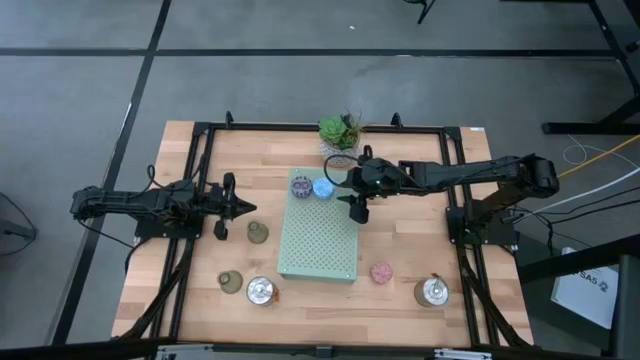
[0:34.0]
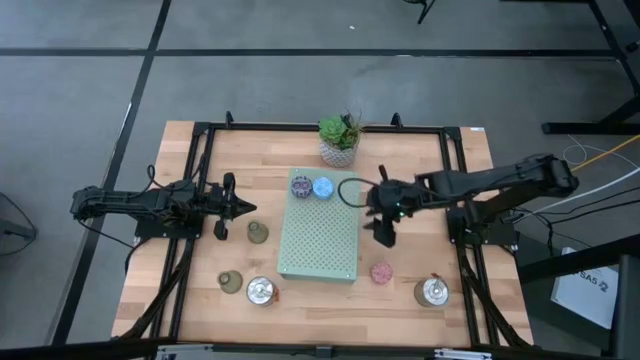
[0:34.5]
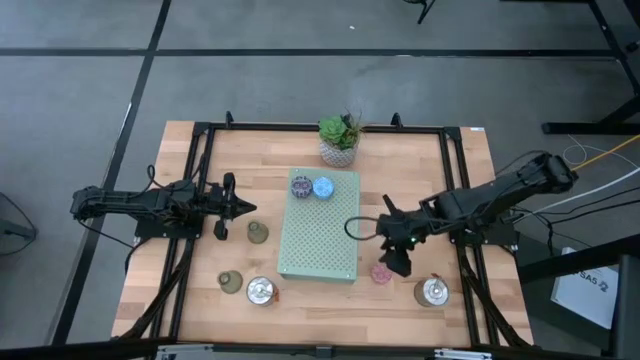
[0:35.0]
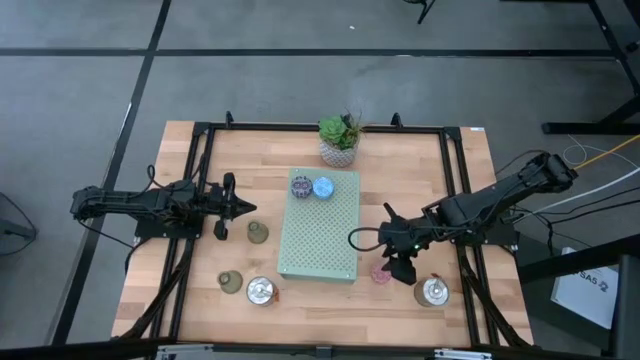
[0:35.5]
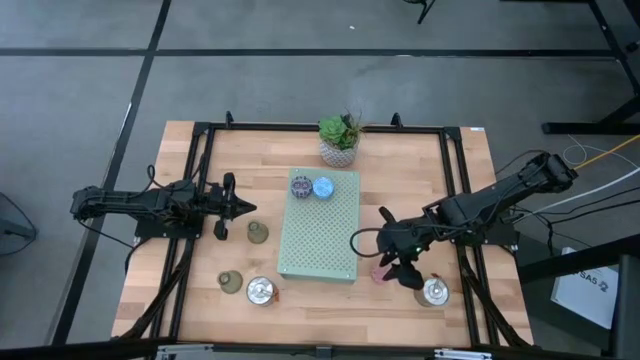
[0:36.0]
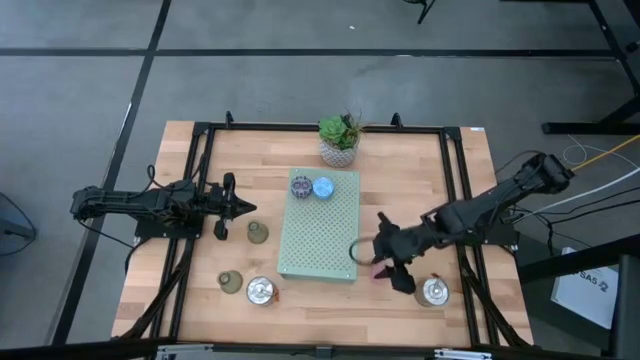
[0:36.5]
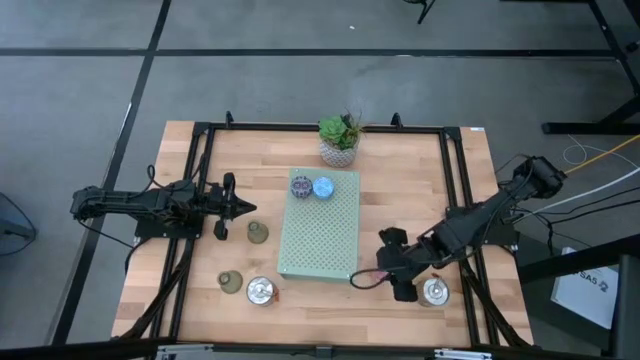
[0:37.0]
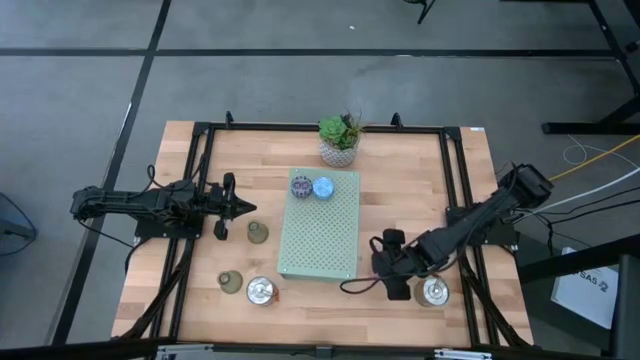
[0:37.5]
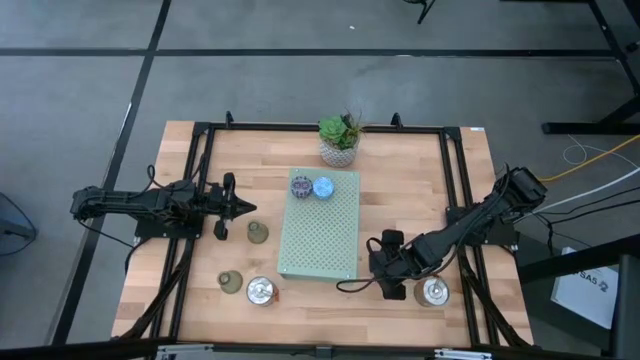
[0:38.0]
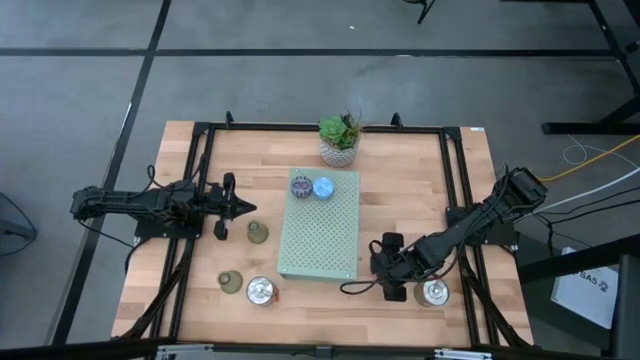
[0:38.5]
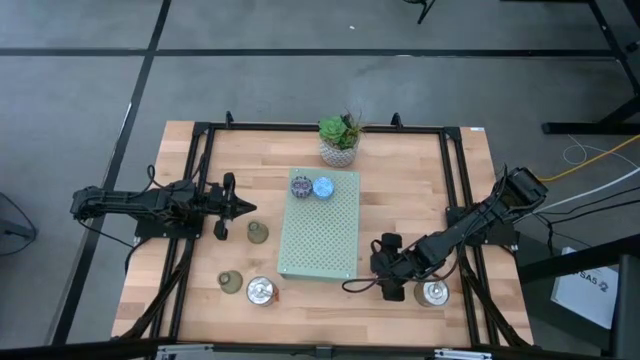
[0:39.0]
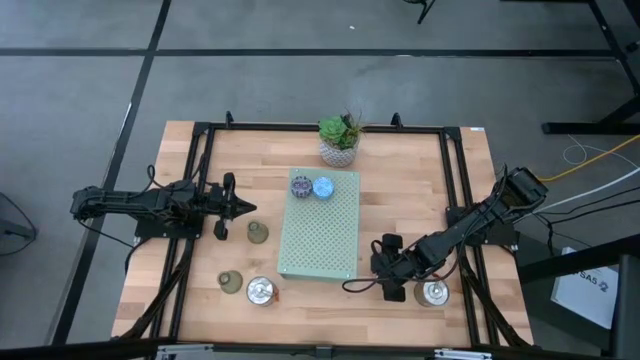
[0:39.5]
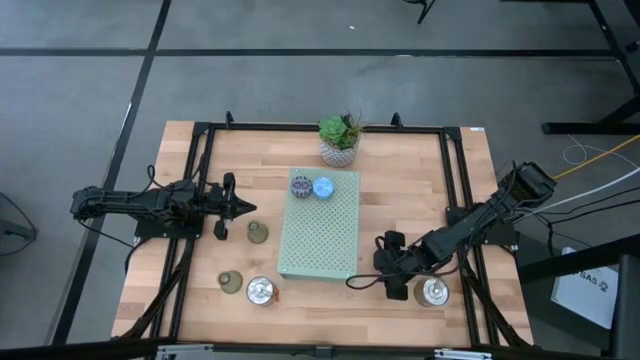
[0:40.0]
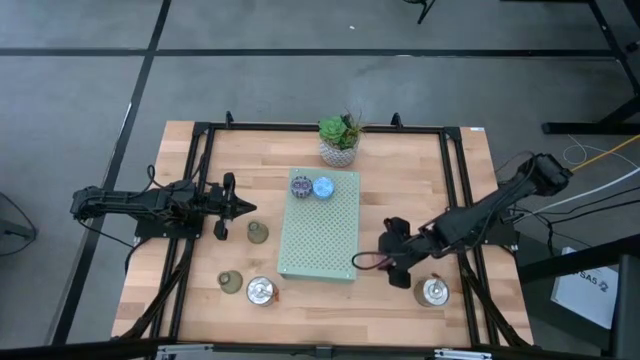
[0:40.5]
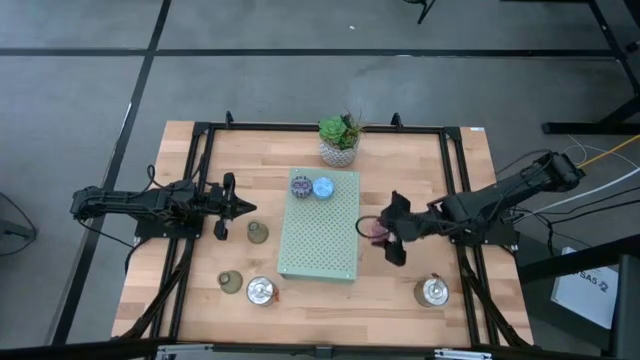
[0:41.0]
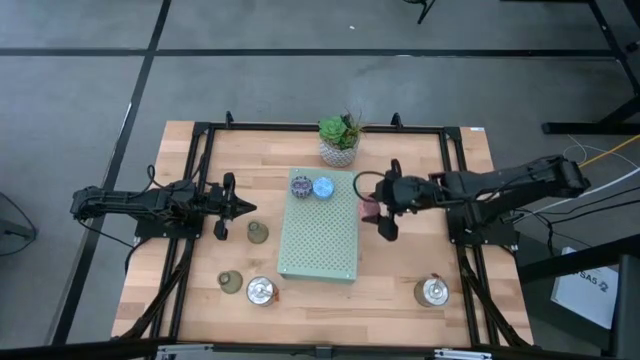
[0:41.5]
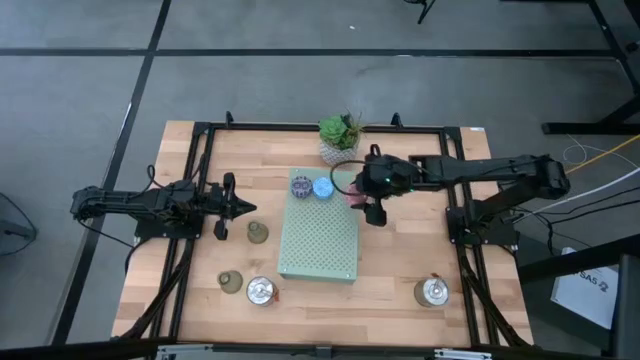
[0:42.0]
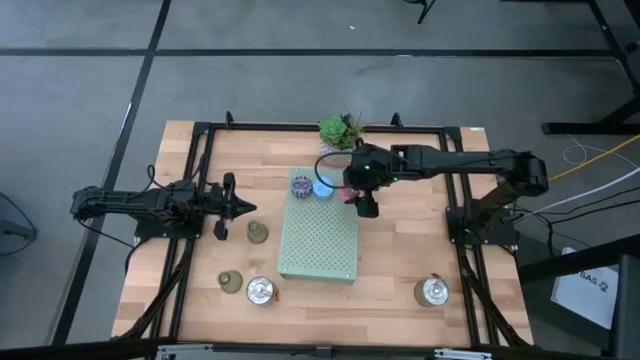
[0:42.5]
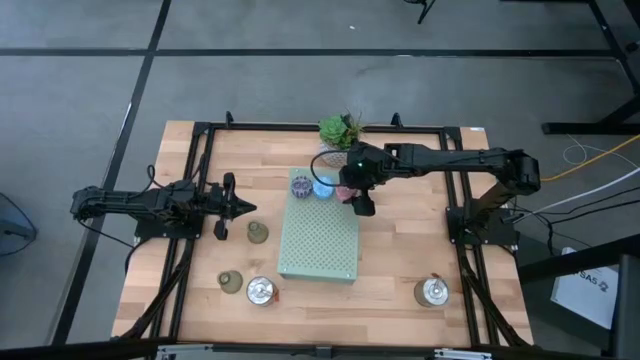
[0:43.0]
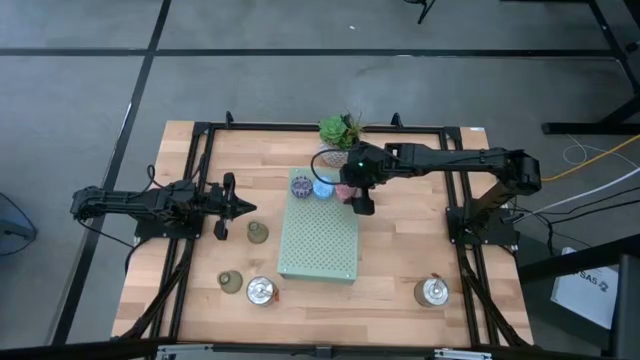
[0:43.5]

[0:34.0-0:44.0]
Task: Pick & Place candle stick holders
Put the pink patterned scented candle on the shelf

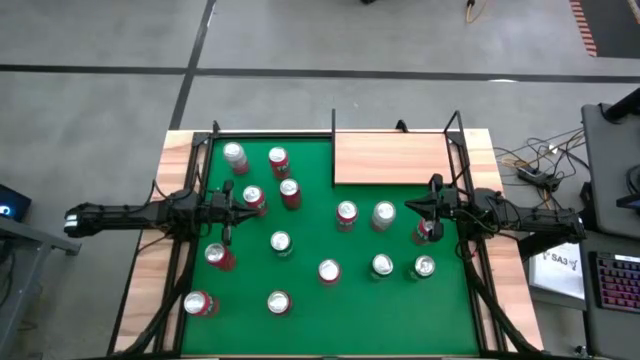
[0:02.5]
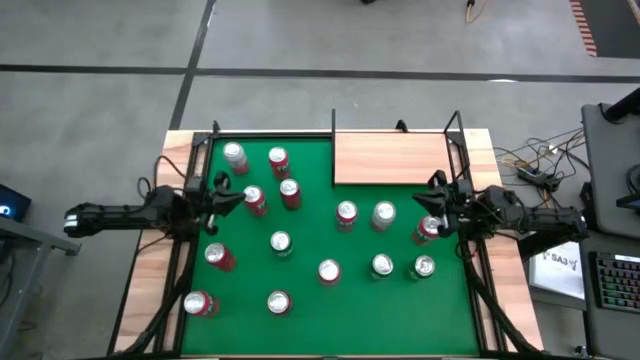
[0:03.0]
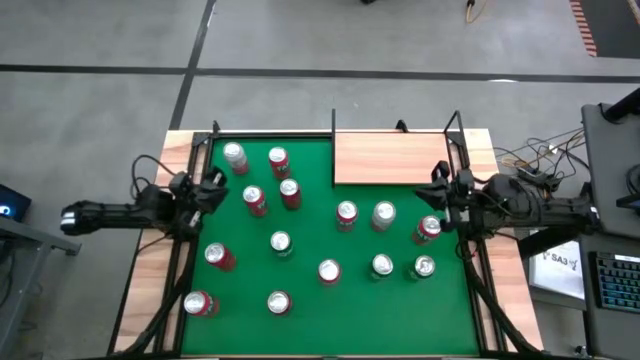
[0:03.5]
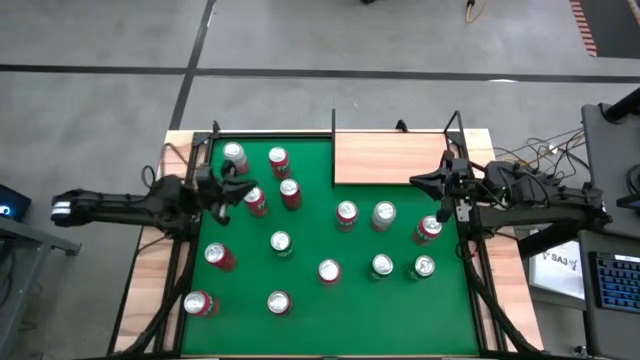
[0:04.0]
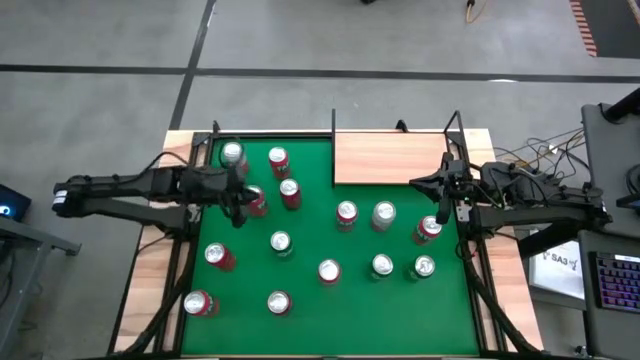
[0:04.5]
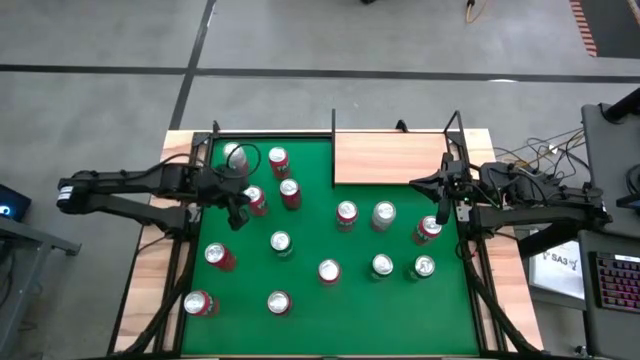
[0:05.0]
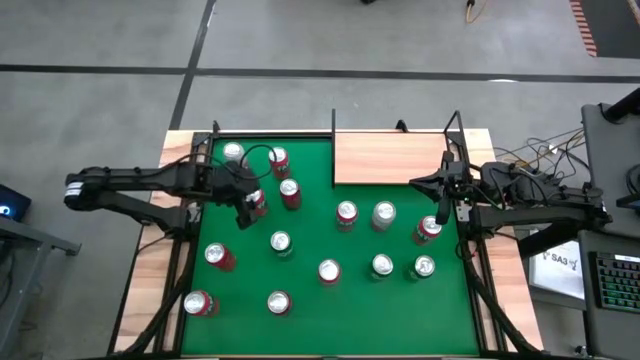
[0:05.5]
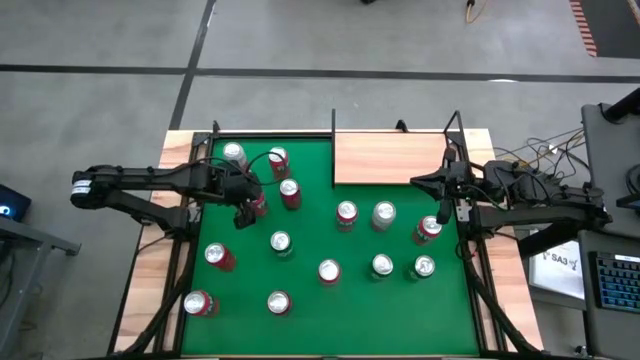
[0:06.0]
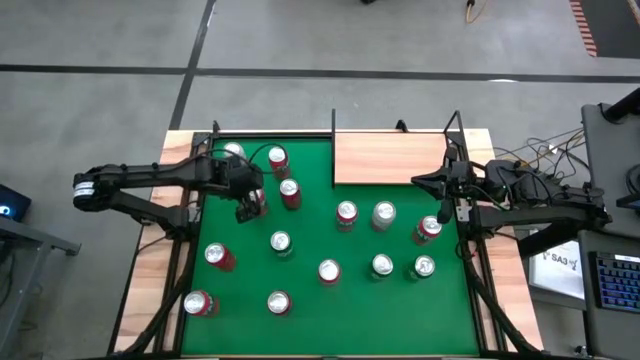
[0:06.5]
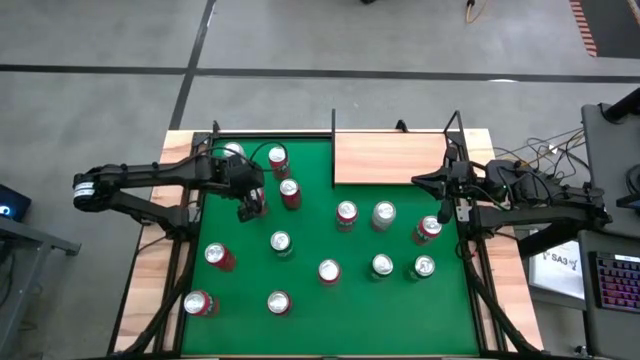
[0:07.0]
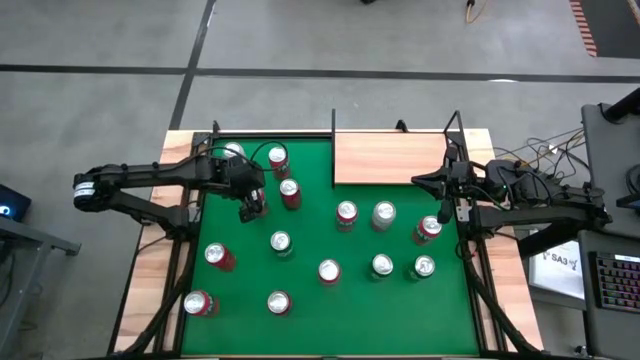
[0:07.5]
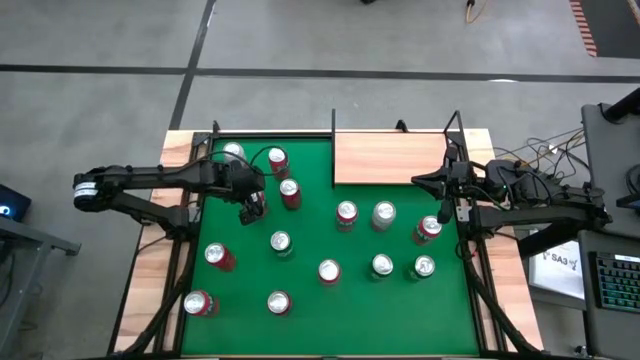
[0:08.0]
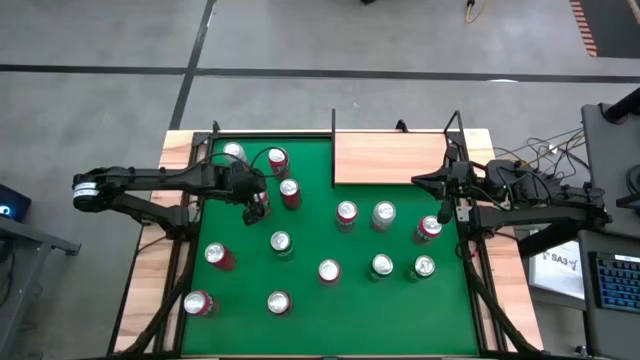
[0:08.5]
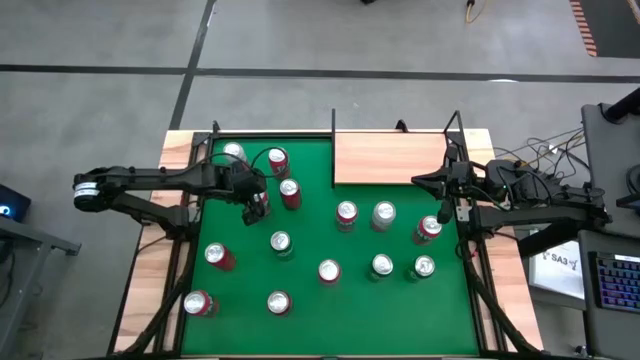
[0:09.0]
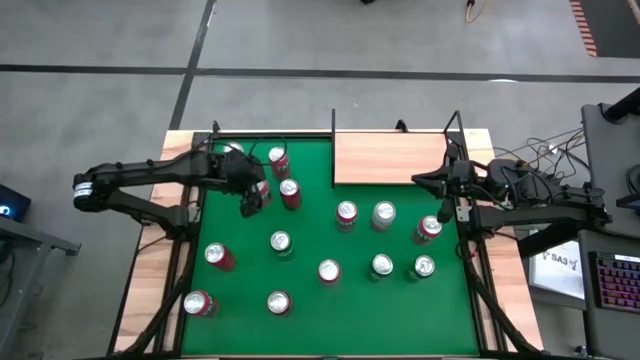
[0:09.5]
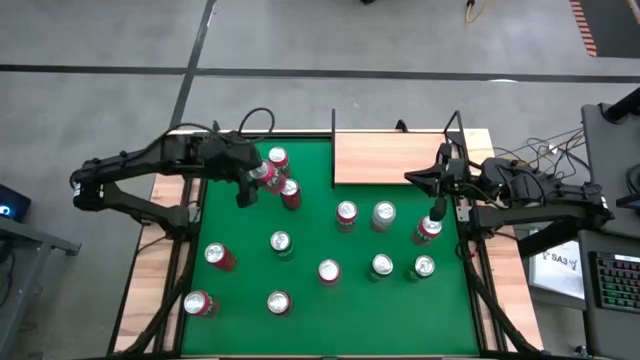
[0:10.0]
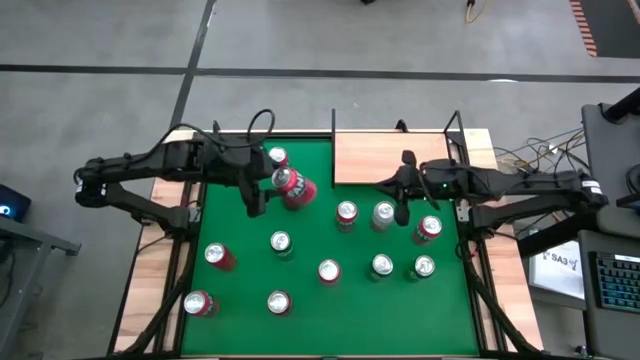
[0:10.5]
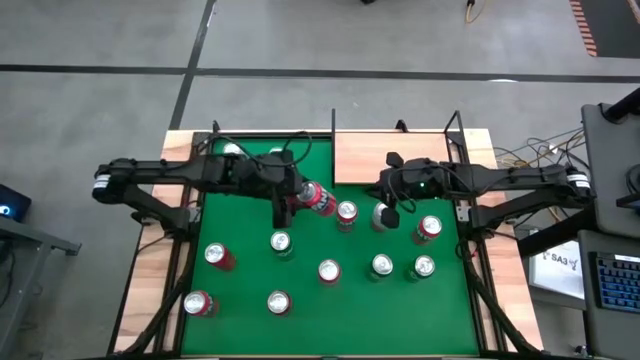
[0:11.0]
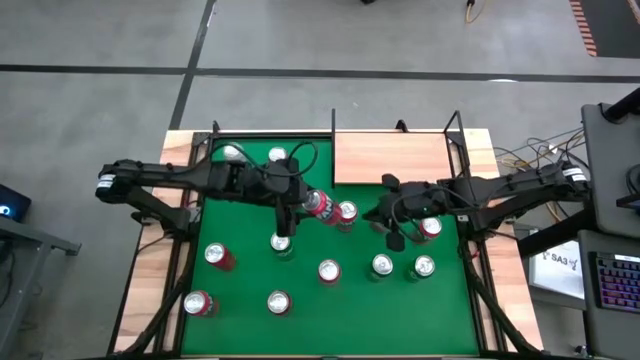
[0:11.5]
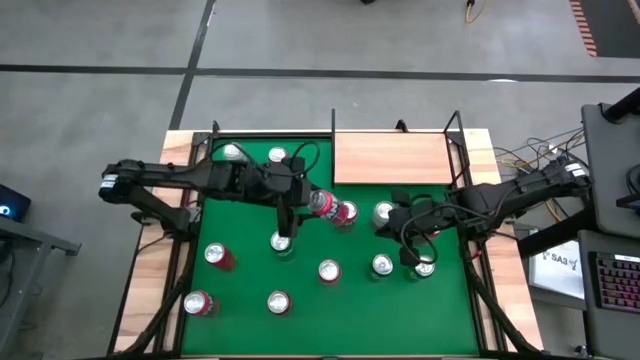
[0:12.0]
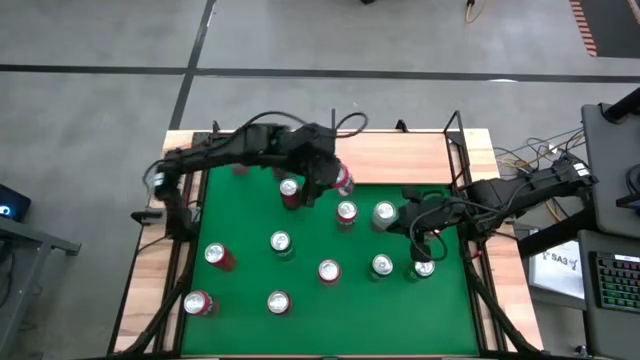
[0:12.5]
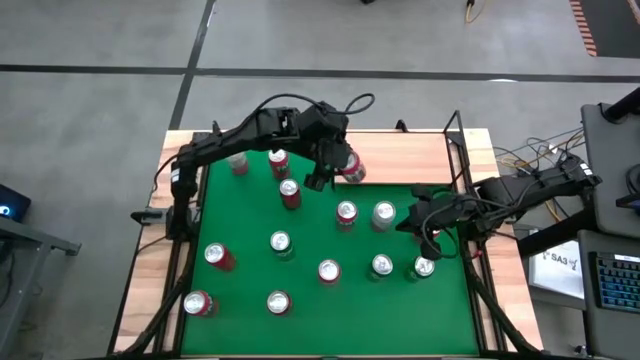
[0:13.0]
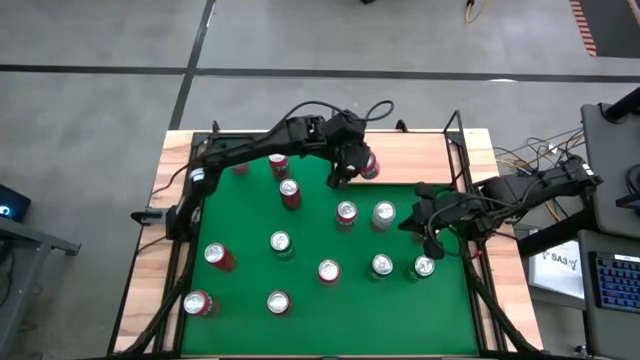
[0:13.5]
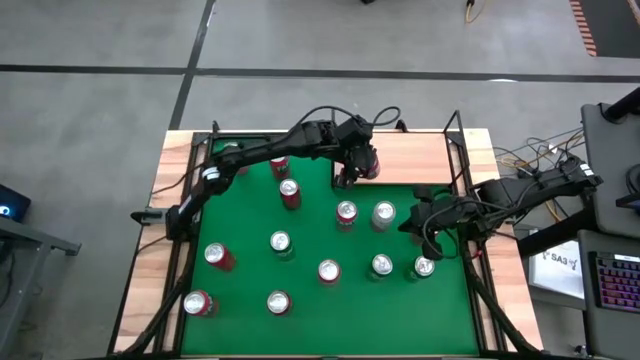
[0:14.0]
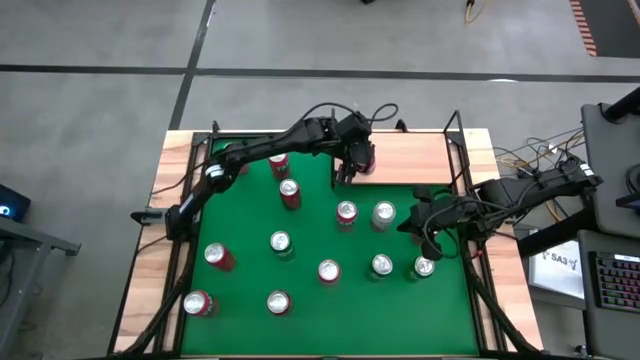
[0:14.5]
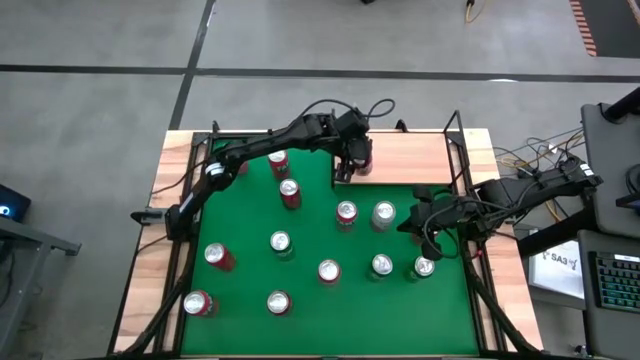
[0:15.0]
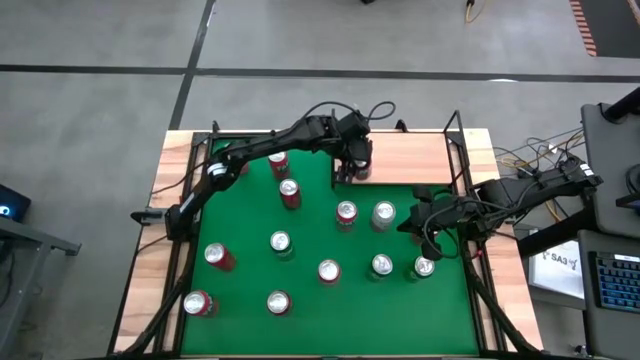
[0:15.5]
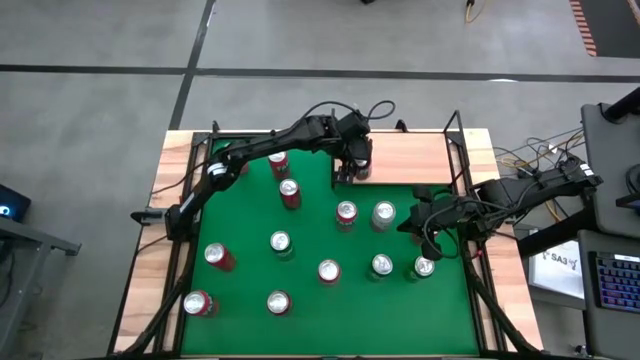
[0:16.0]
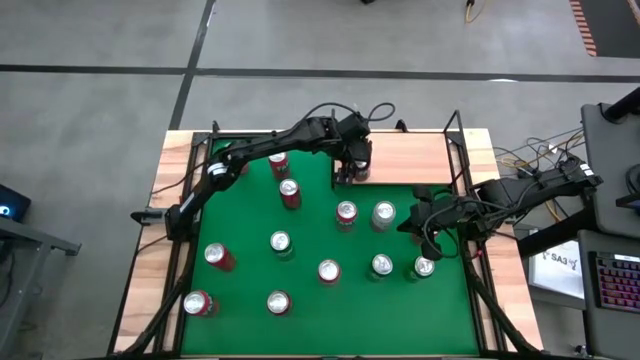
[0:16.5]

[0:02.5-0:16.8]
Task: Place canned beverage on shelf
Put the red soda can on the shelf
